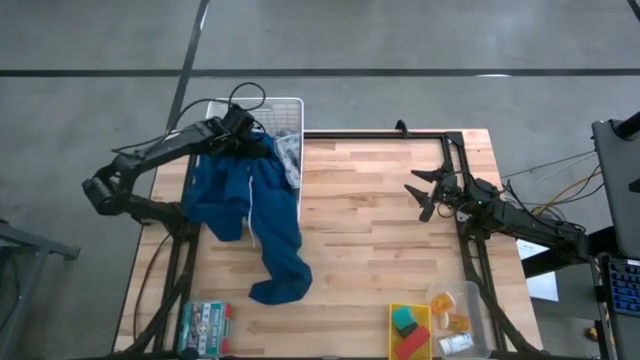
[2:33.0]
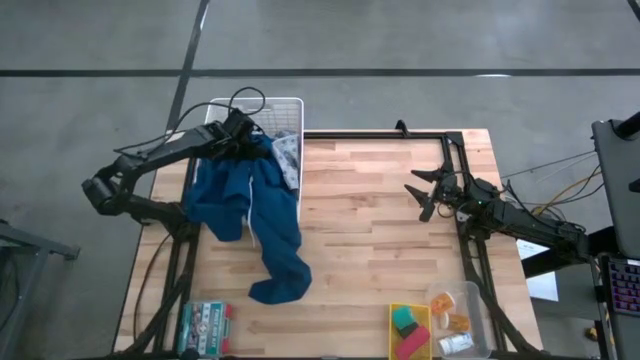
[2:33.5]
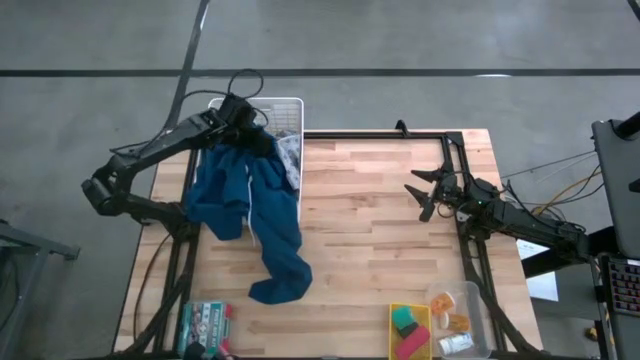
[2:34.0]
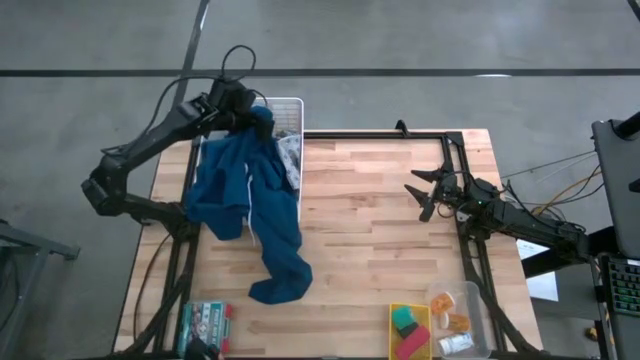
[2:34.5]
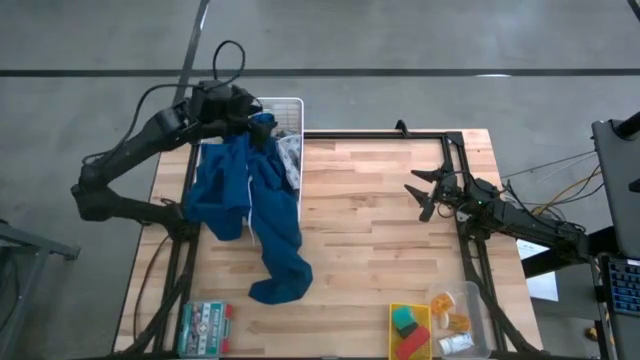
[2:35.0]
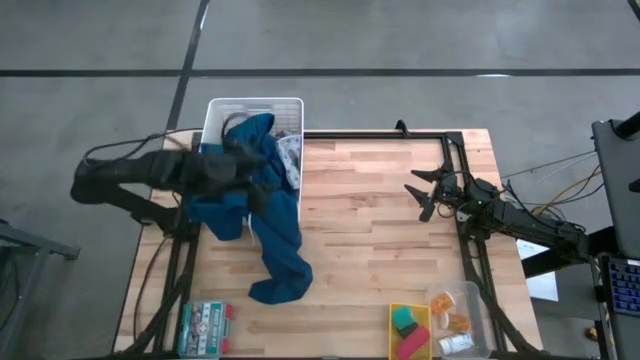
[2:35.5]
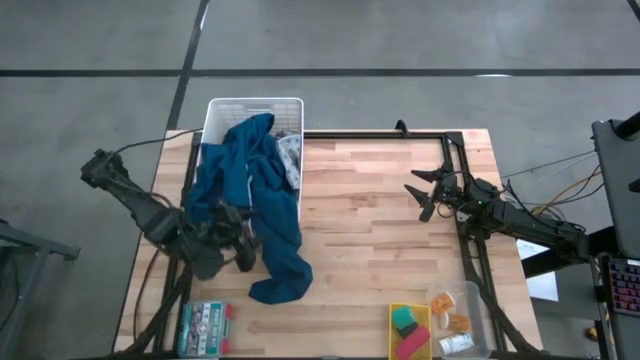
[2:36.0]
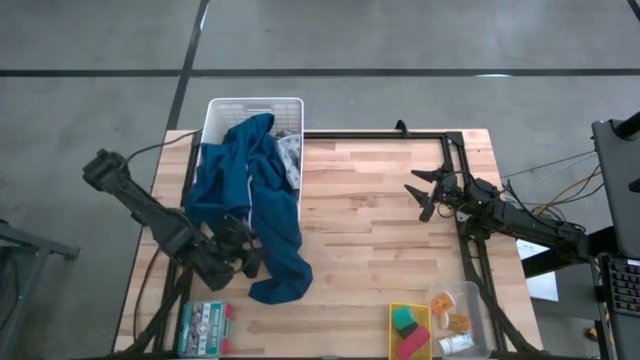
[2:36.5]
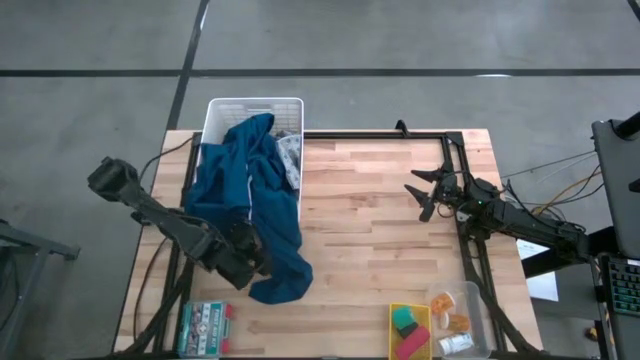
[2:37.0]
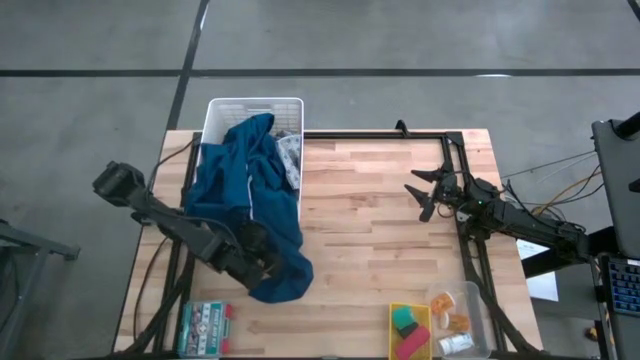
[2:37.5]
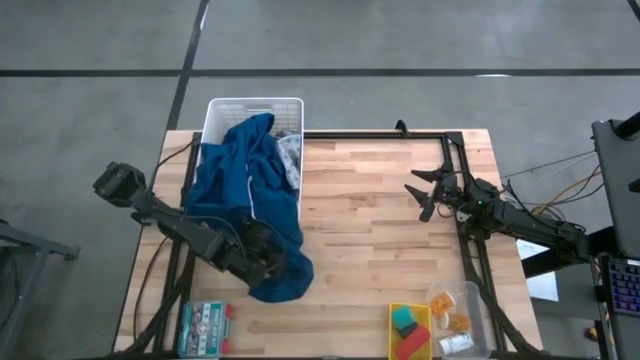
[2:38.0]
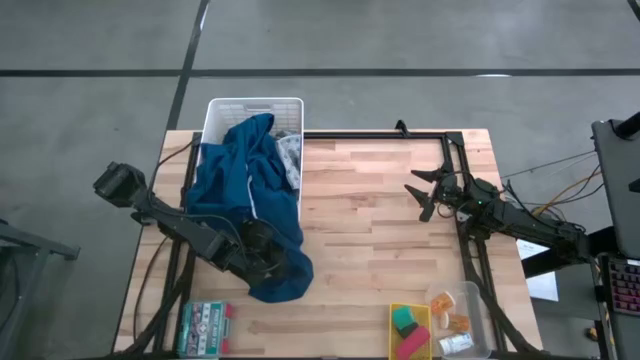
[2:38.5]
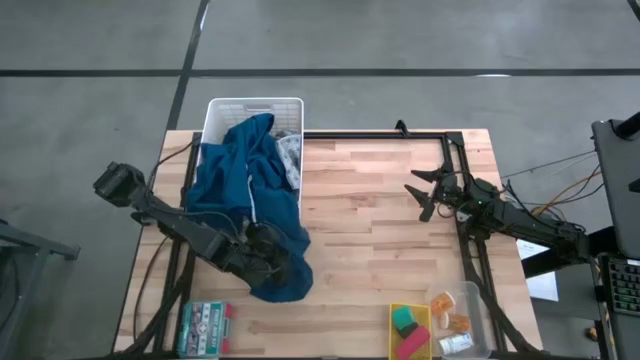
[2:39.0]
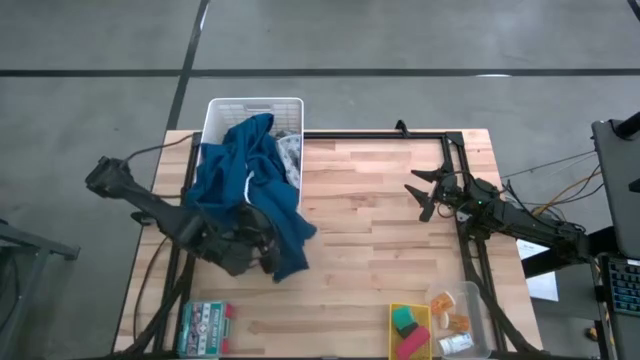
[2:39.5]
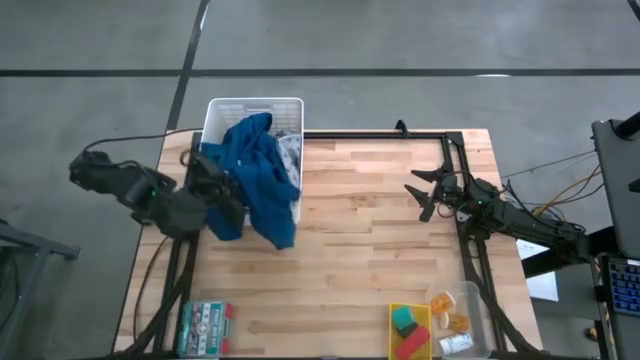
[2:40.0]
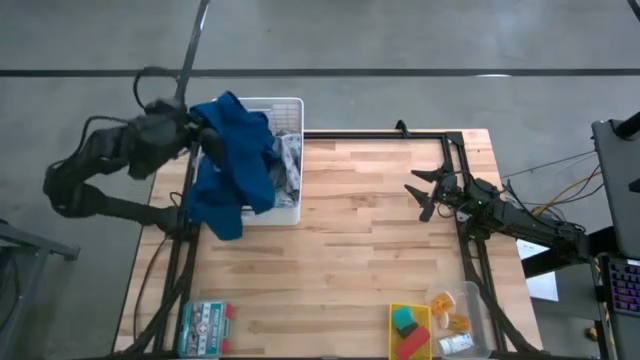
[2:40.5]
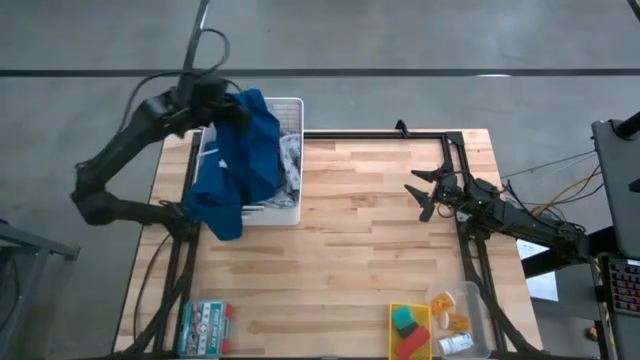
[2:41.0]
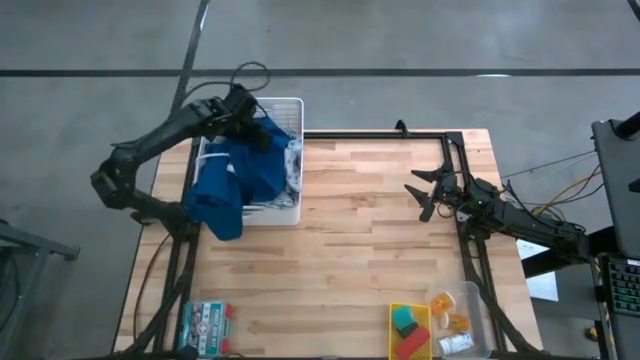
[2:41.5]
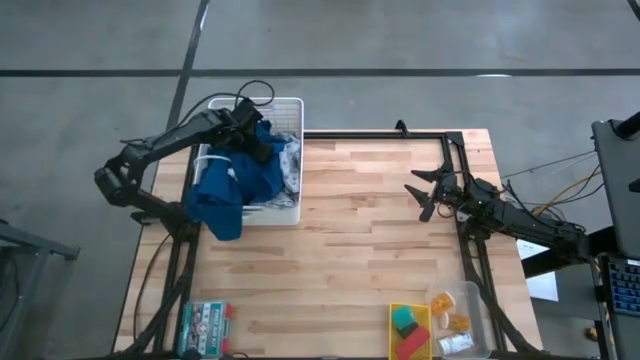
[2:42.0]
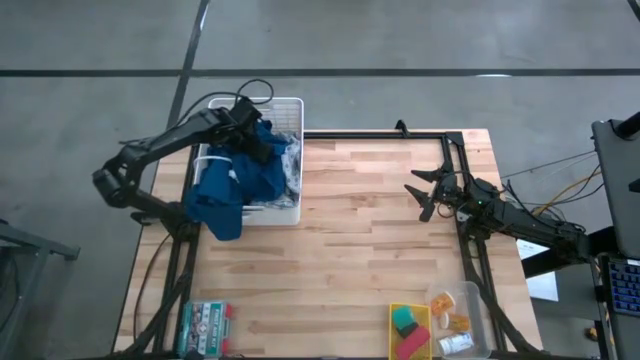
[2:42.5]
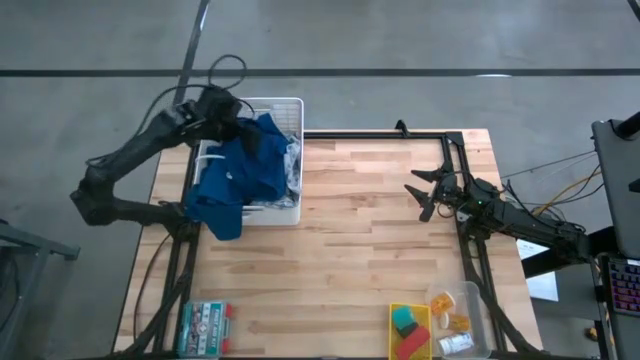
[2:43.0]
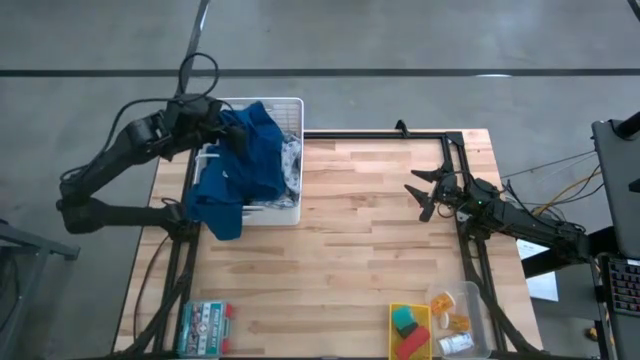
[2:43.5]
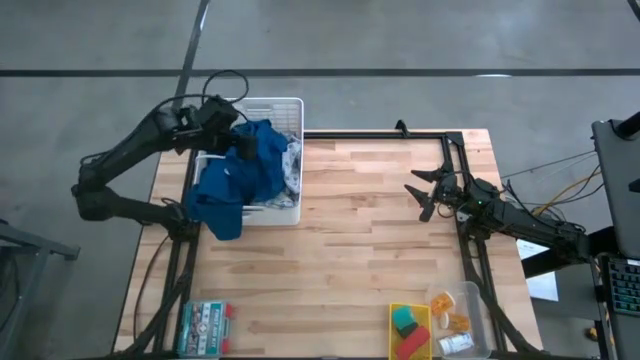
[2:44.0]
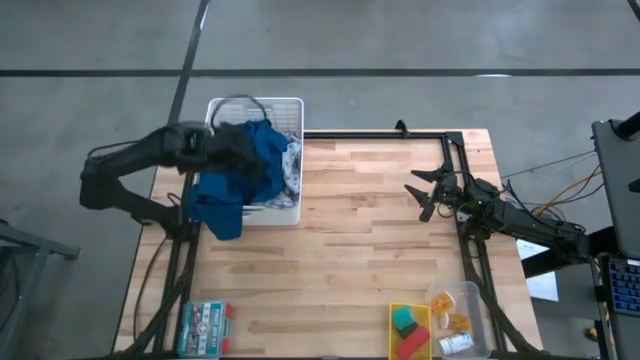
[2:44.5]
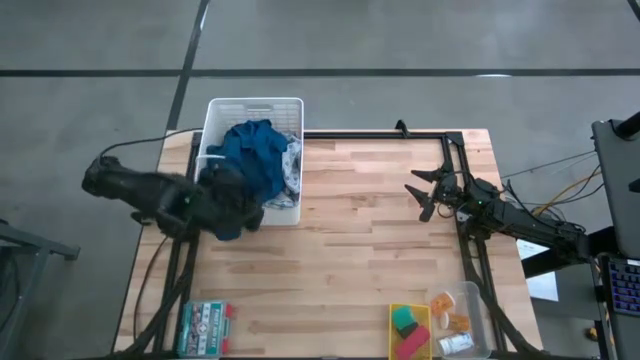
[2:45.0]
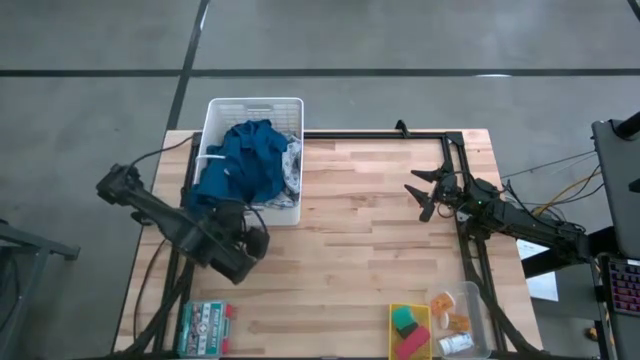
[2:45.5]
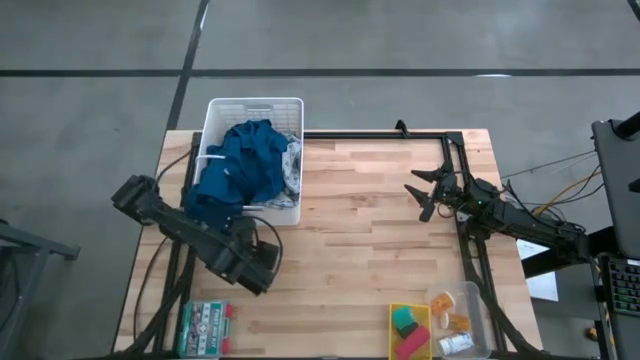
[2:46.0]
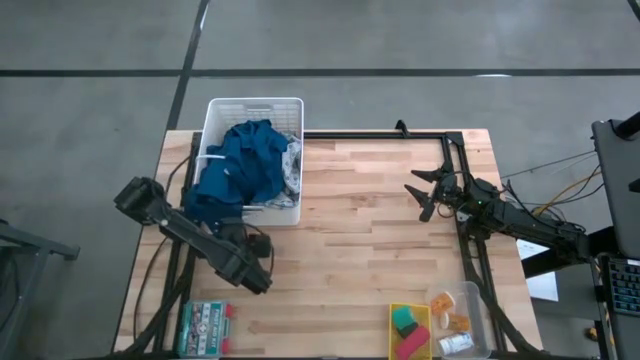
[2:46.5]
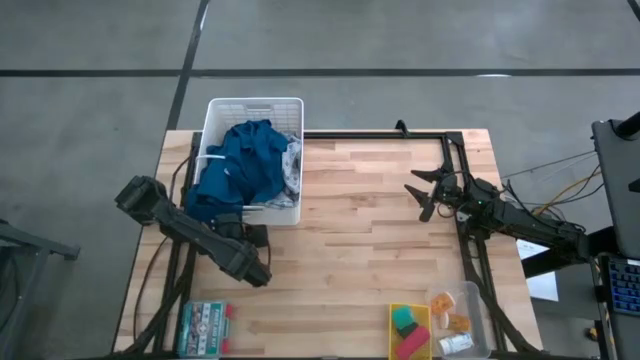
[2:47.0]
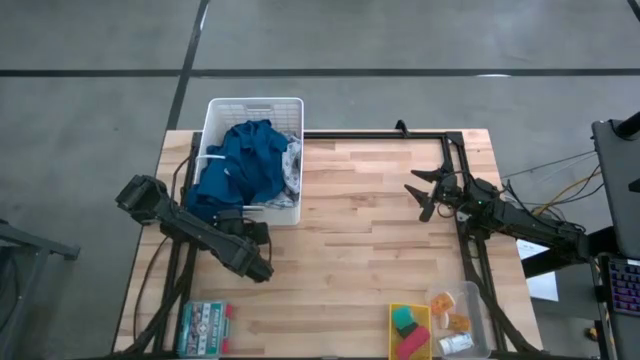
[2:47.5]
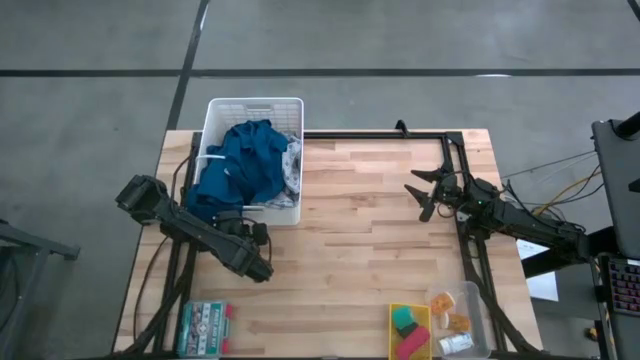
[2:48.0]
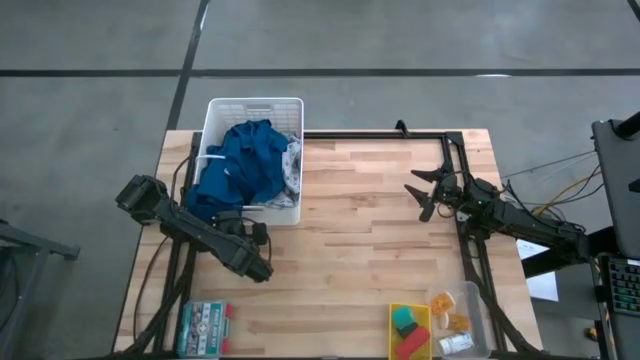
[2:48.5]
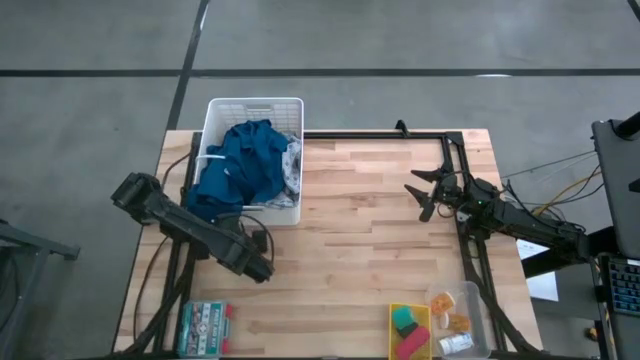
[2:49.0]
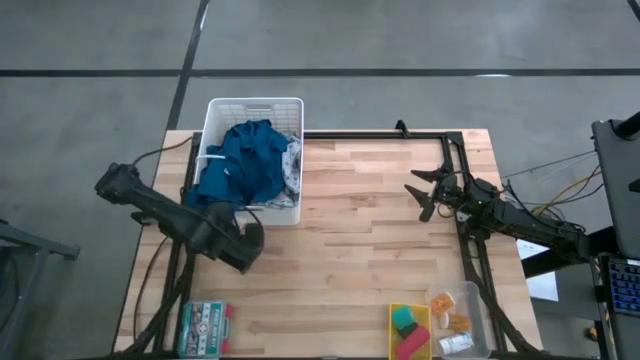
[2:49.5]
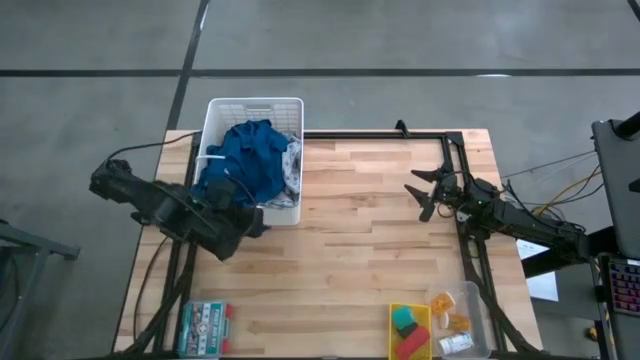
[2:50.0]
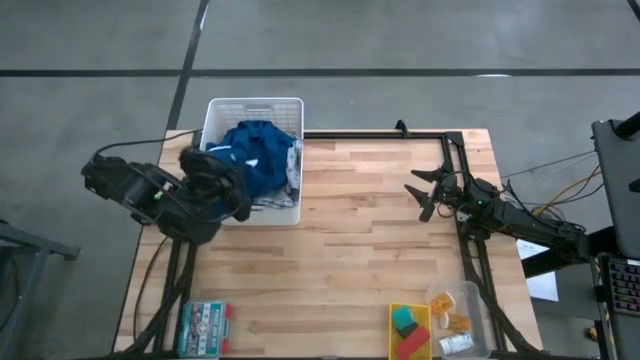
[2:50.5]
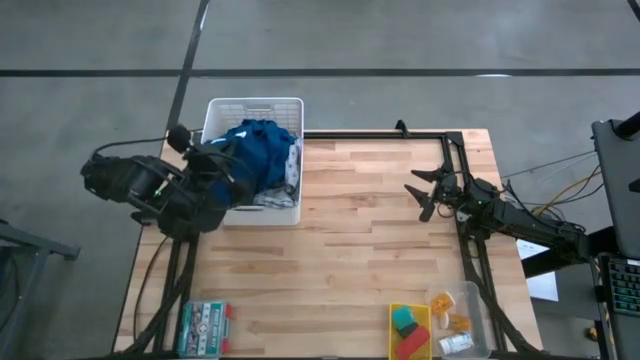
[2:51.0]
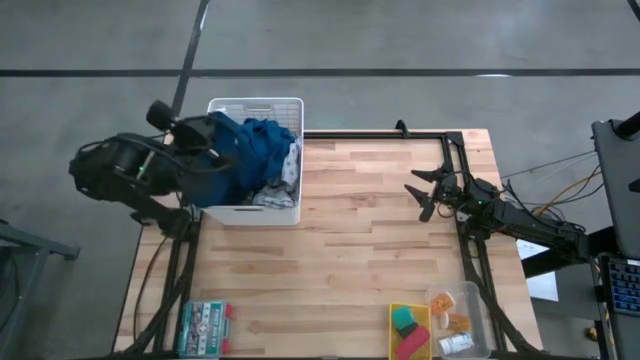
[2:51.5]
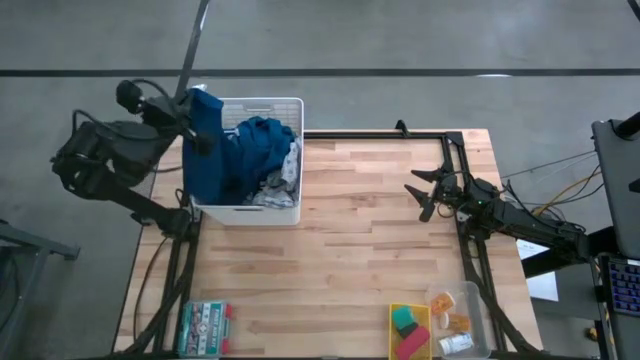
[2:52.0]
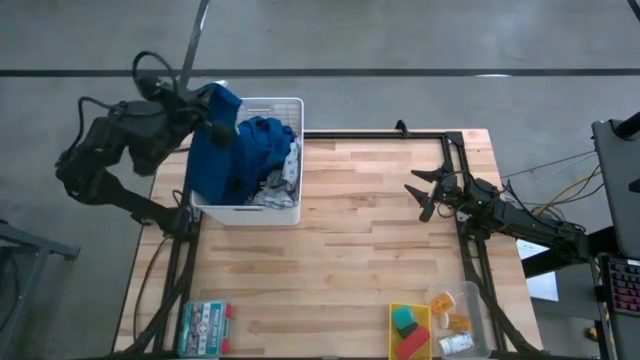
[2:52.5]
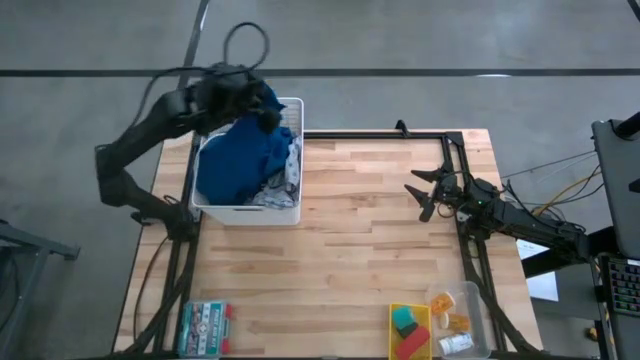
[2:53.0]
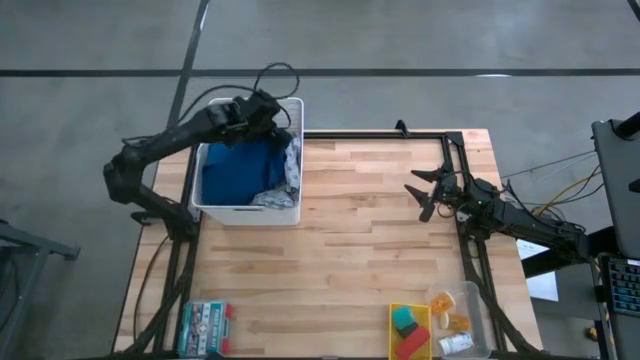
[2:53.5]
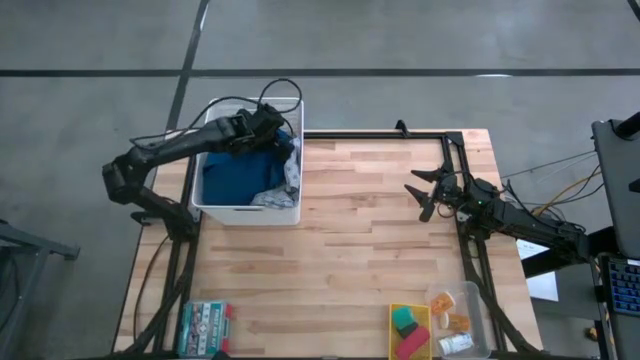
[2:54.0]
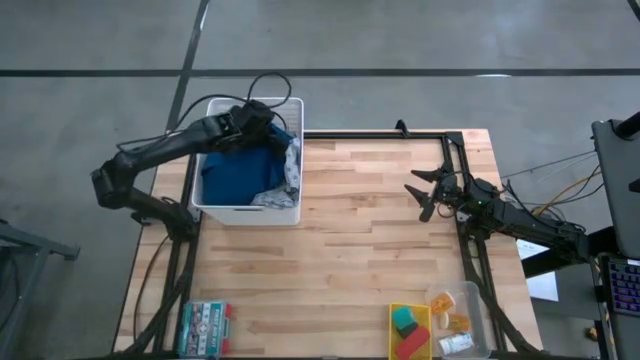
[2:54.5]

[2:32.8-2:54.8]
Task: Pick & Place Medicine items
Put the blue patient gown into the white laundry bin
